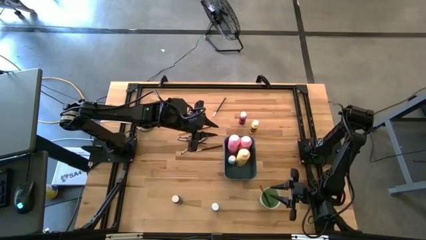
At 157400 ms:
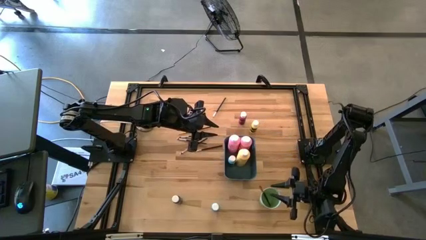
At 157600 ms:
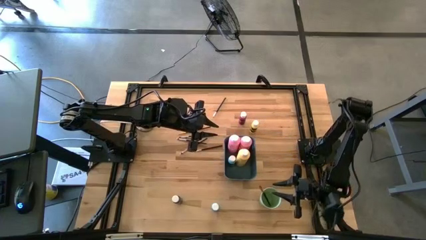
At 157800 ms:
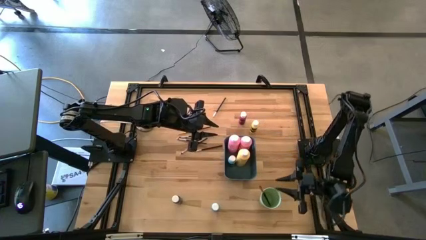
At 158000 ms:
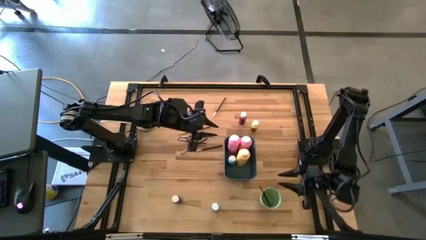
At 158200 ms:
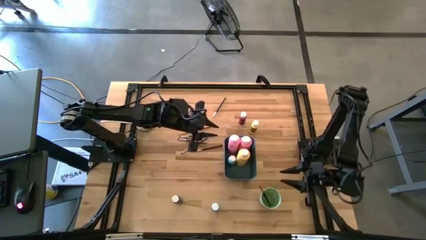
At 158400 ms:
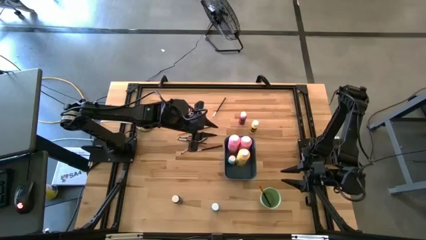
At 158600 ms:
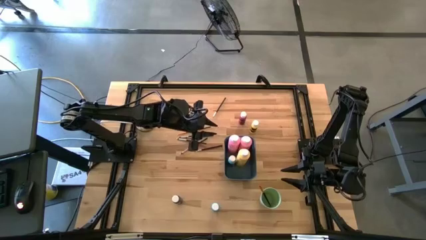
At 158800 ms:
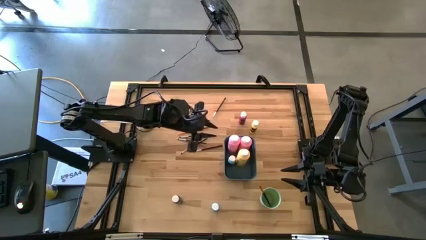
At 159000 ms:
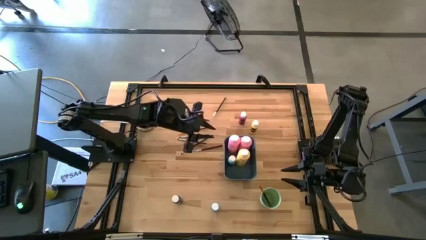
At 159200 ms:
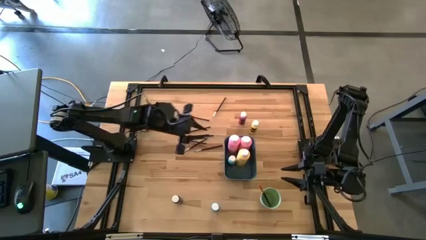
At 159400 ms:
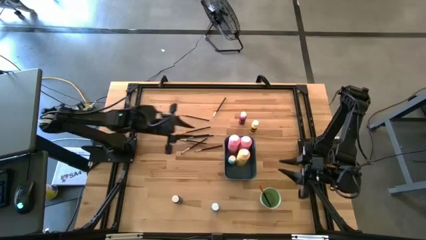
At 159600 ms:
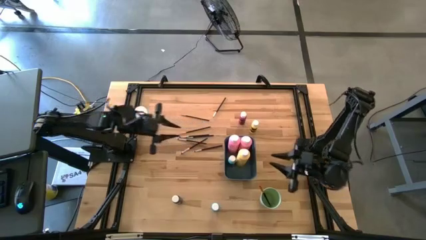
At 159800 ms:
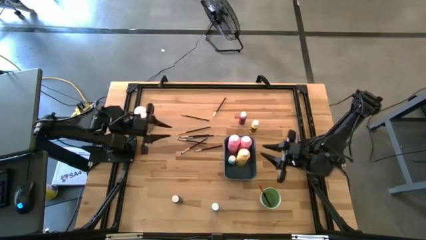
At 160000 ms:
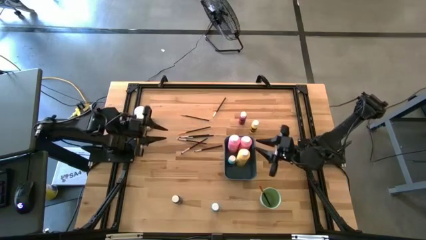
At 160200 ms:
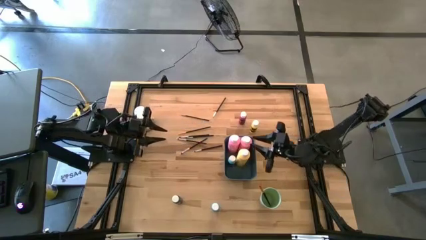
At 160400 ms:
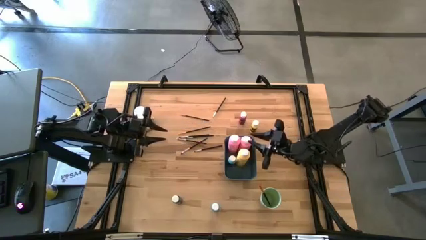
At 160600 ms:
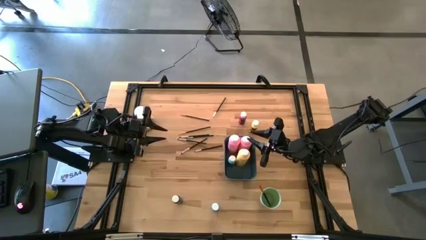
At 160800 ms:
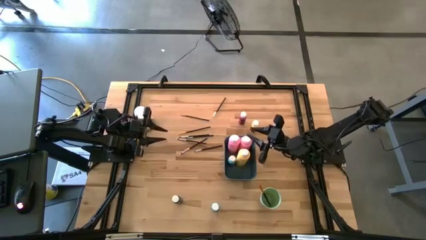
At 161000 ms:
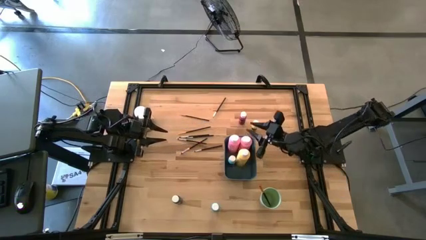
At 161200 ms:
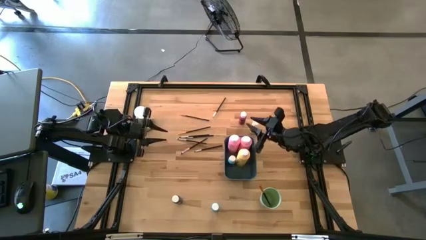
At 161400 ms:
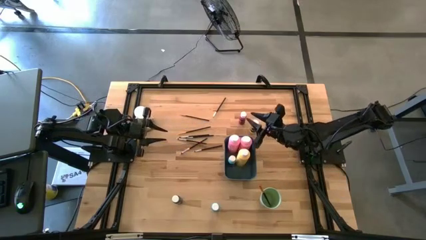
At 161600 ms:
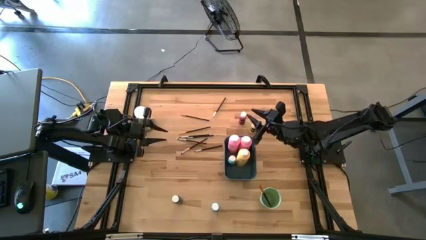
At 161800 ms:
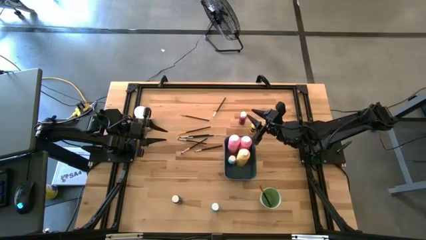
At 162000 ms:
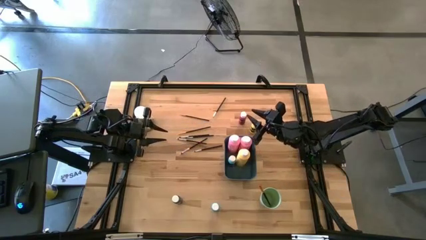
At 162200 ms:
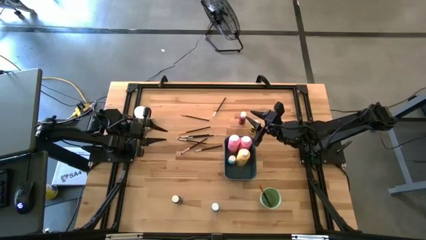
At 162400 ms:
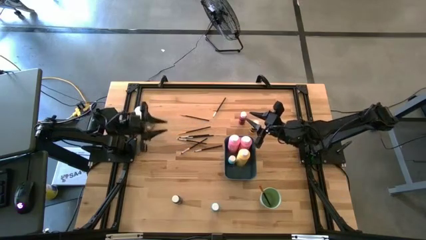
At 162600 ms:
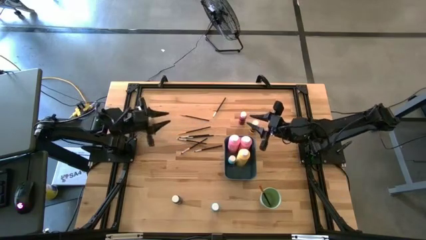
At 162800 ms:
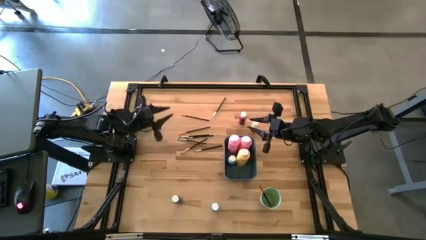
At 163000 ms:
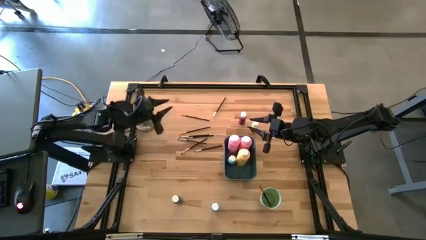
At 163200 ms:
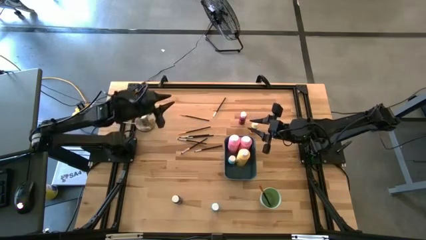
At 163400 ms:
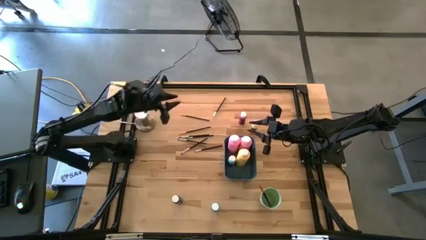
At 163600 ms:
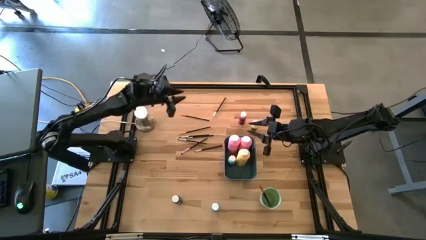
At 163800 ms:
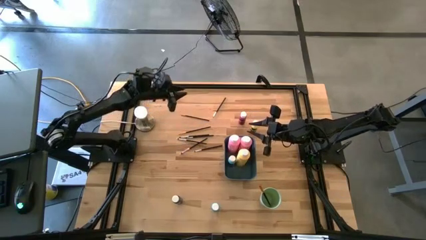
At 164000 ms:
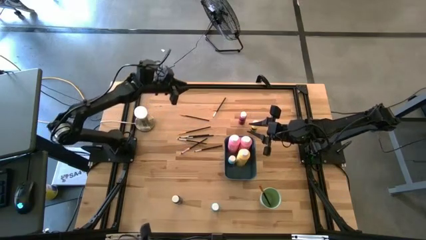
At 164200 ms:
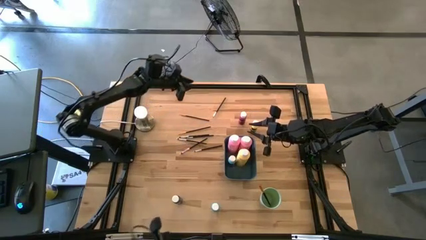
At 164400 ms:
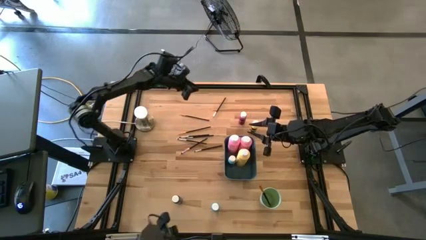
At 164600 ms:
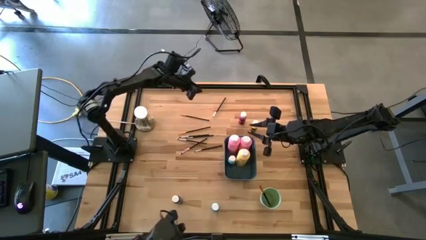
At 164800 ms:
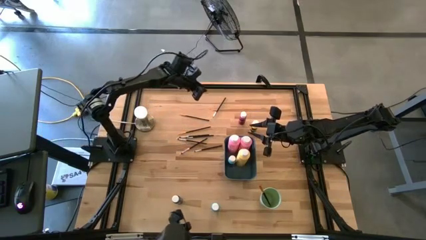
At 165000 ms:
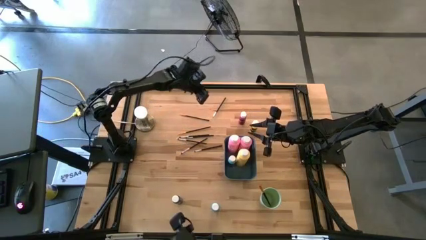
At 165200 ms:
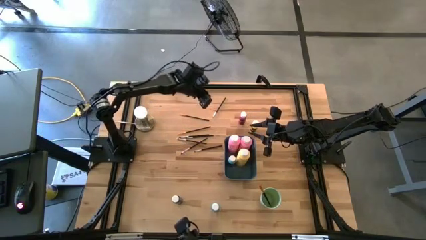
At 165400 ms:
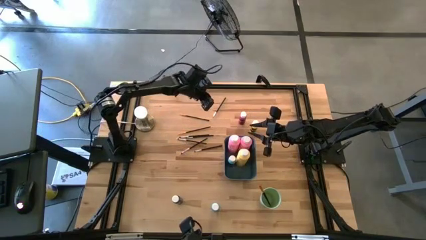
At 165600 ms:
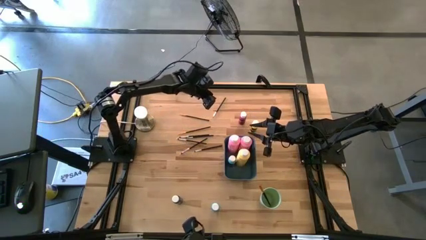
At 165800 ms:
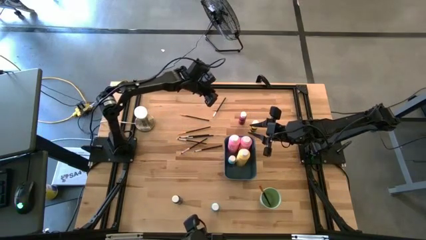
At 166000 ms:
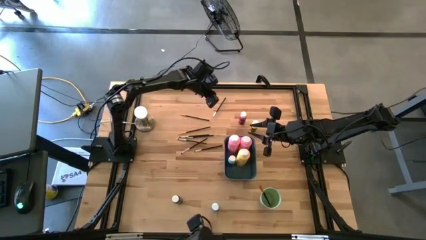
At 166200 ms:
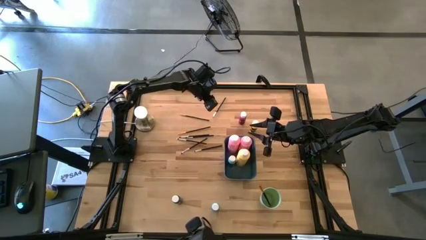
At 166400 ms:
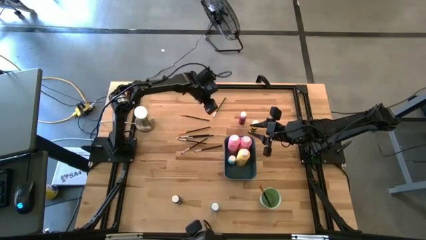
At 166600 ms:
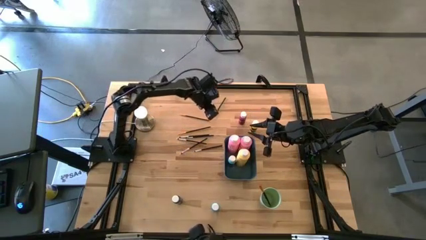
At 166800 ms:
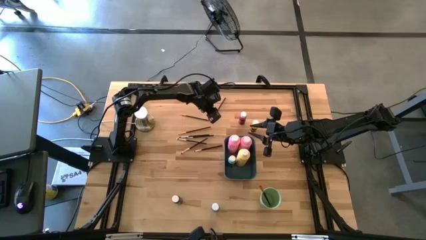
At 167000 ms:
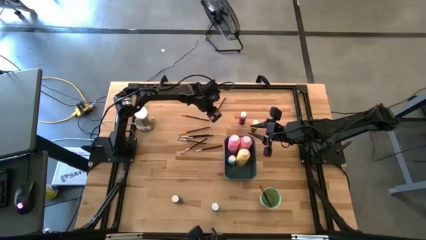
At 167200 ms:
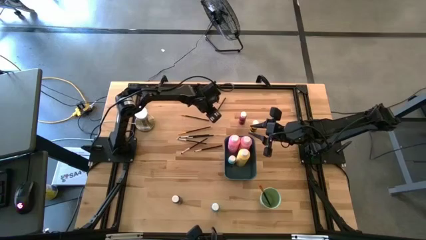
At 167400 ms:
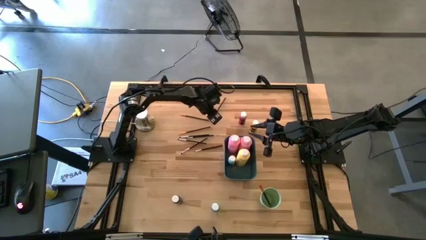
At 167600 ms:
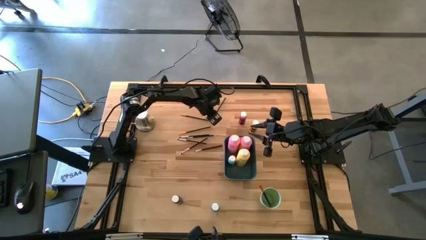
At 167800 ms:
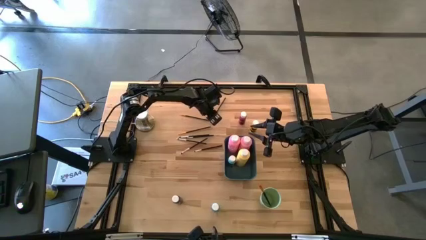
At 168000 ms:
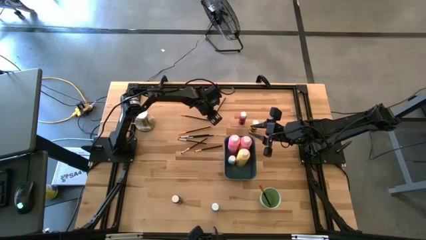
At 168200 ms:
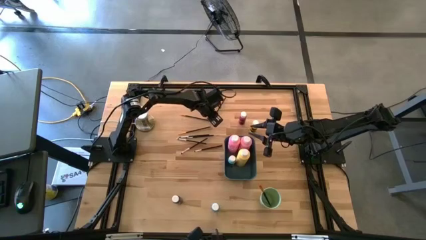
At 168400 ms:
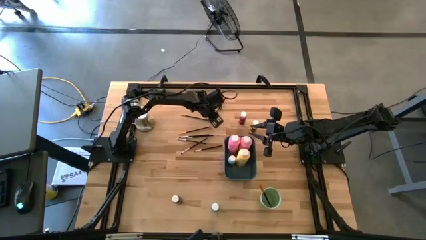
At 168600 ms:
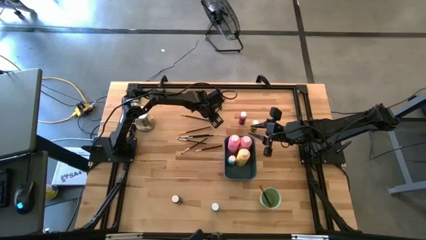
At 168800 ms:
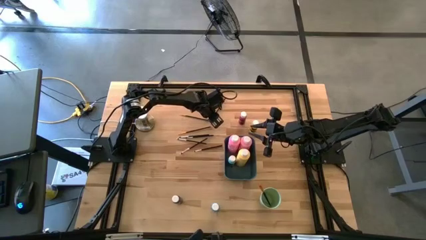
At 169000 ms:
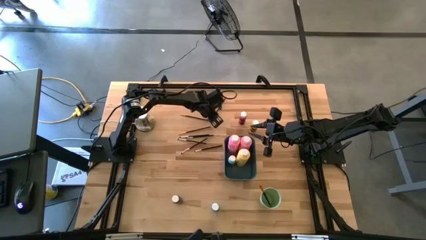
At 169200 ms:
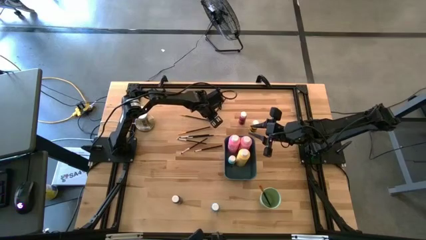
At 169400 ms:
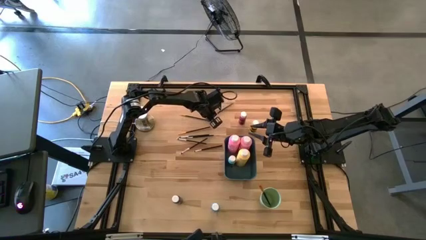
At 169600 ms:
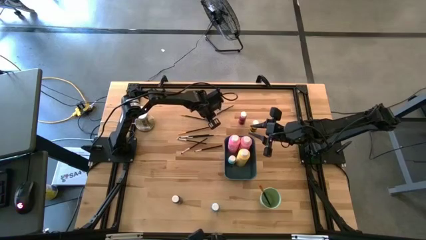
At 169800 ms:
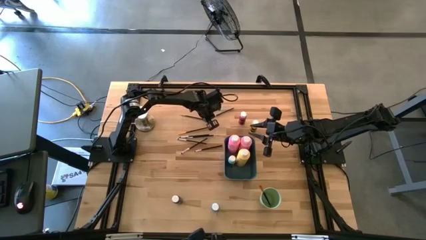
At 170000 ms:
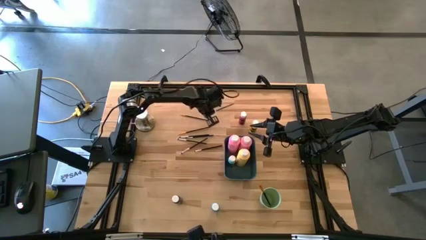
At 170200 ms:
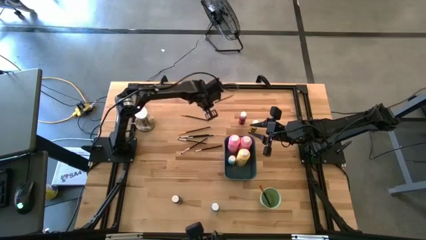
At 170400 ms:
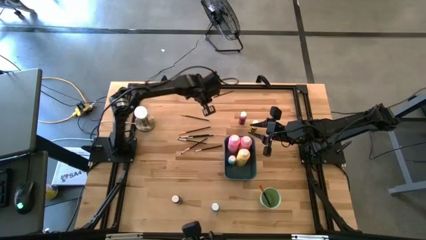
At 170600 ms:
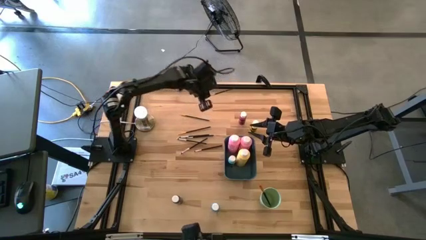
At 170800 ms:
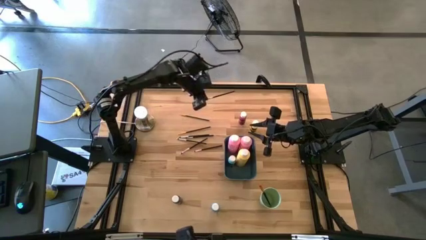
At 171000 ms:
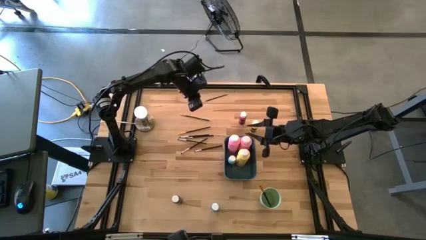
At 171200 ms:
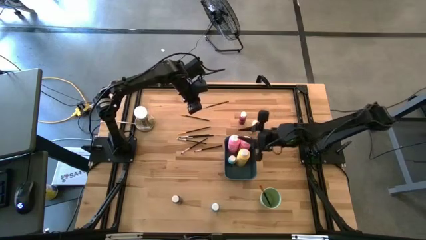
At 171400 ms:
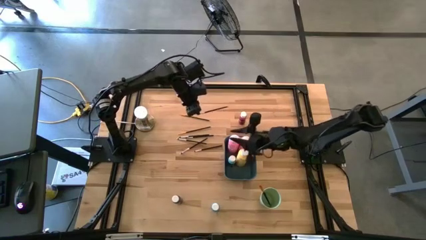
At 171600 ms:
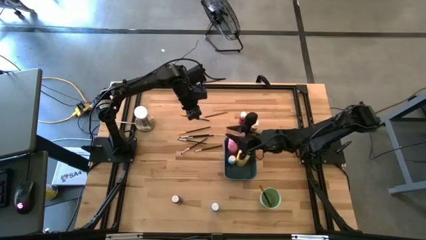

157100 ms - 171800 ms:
Task: Pick & Place Paint Supplies
Put the black and silver paint brush into the green cup

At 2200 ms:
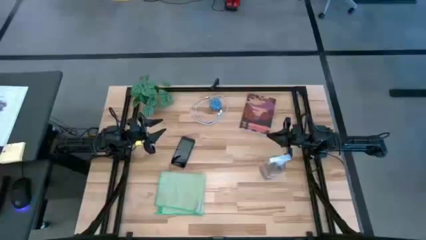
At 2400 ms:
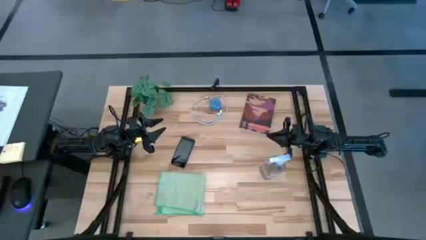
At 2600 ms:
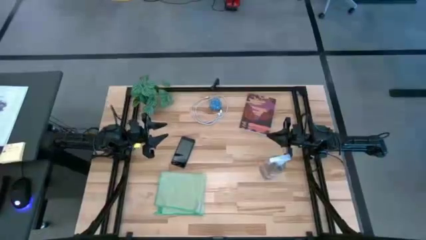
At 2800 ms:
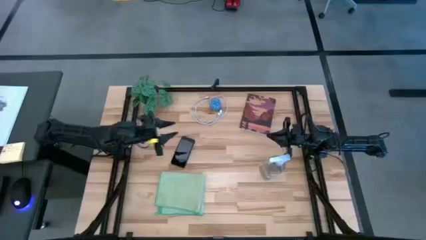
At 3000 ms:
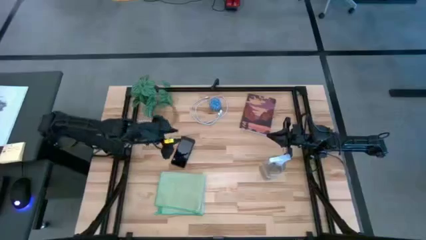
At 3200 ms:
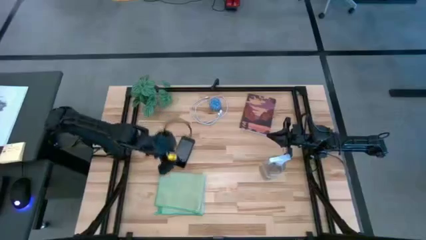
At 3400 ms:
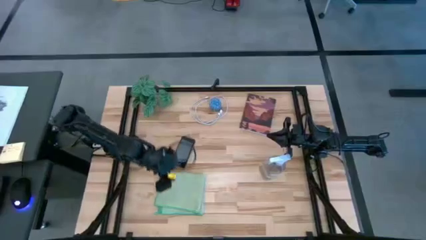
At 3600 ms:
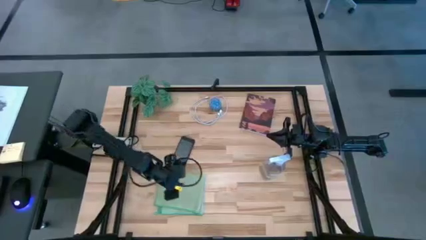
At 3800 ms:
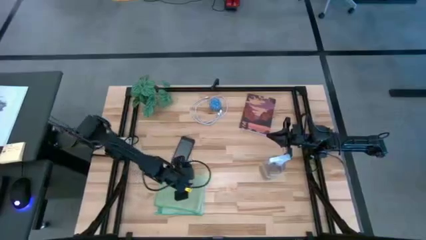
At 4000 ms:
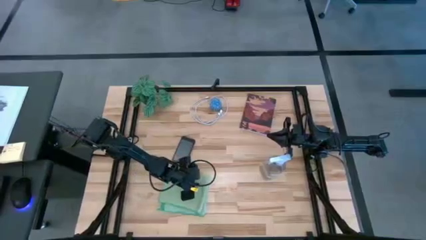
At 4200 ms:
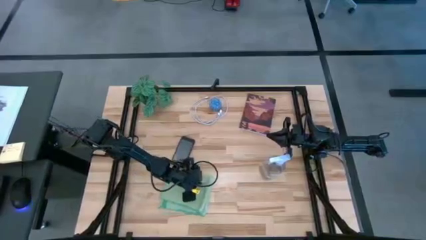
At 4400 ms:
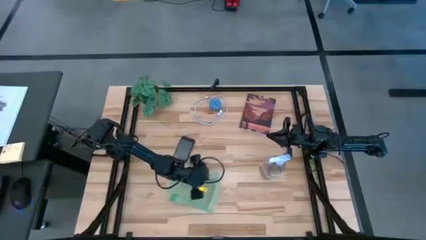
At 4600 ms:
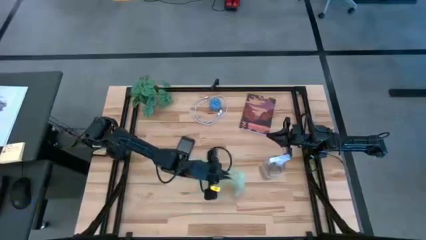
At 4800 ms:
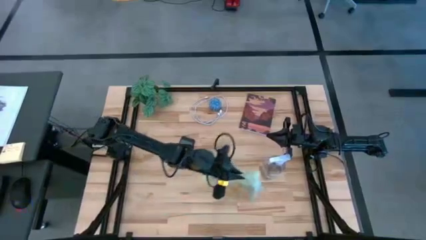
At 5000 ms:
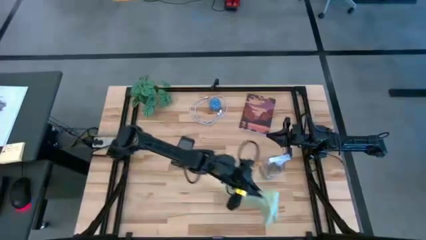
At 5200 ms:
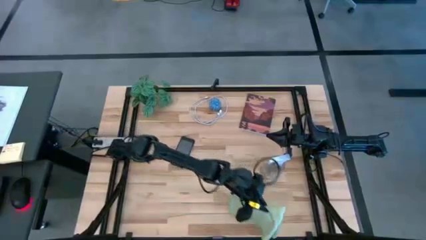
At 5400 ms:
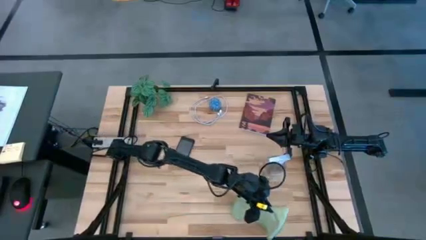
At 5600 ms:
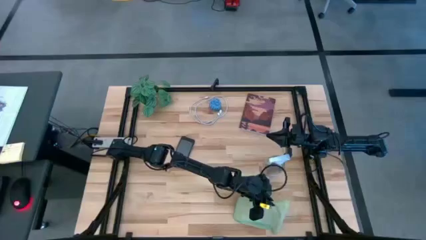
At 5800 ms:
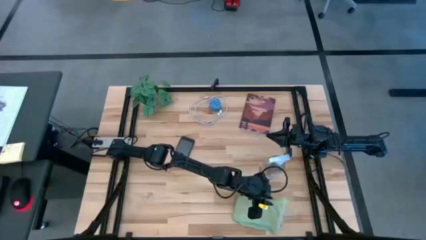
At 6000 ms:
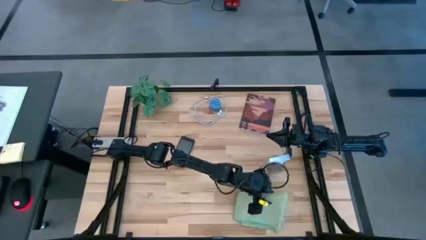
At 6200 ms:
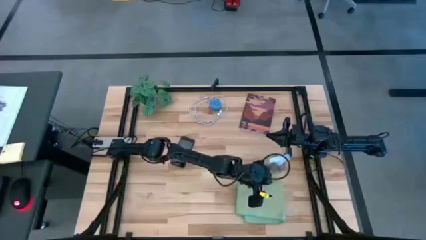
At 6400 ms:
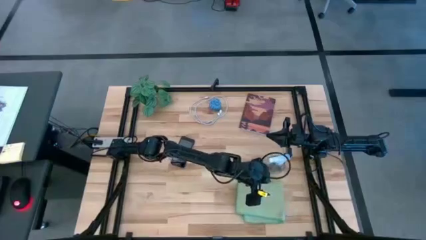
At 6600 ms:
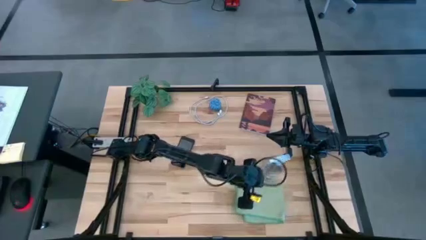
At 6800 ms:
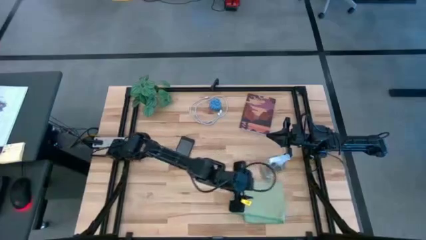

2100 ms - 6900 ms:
Task: Apply microfiber cloth
Move the green microfiber cloth to the bottom right
